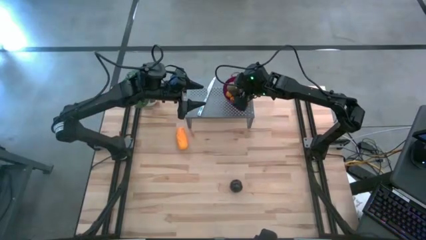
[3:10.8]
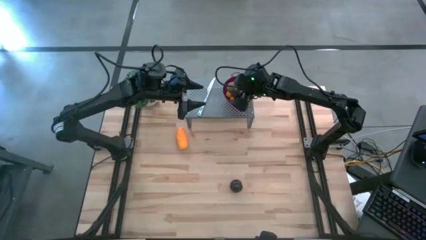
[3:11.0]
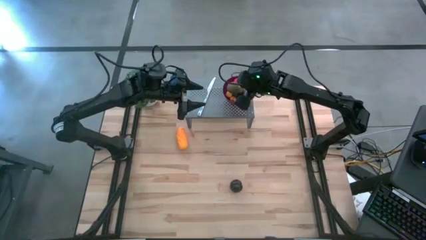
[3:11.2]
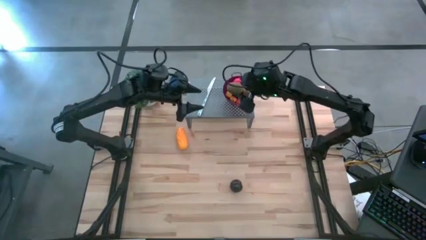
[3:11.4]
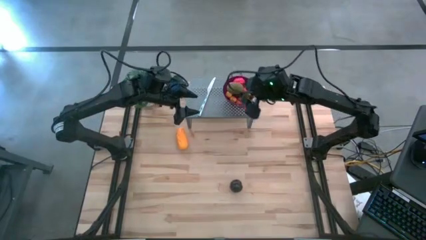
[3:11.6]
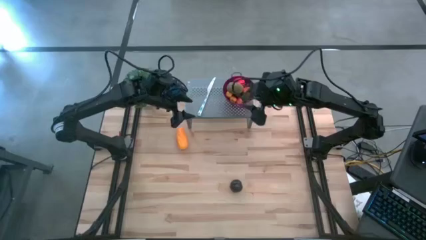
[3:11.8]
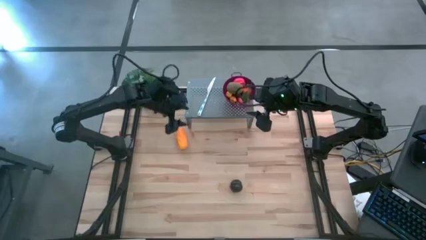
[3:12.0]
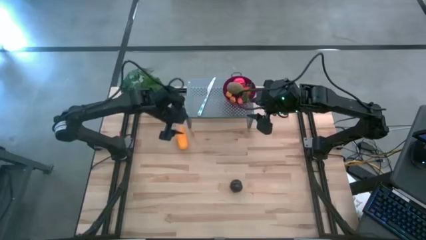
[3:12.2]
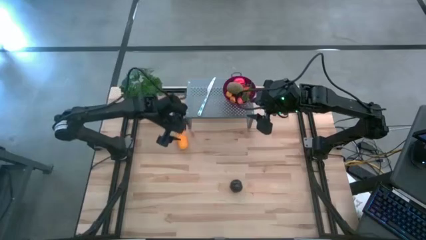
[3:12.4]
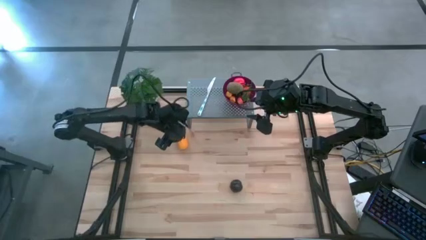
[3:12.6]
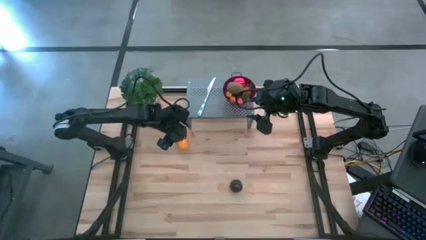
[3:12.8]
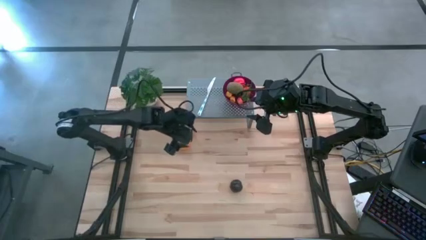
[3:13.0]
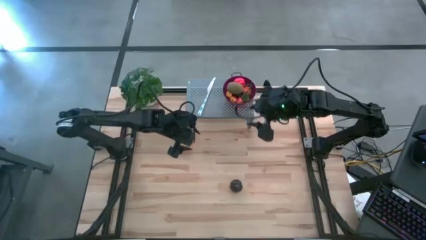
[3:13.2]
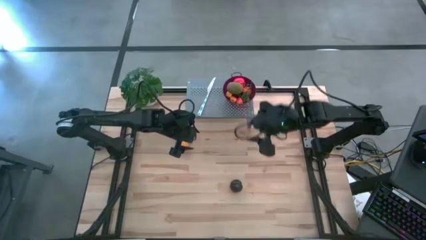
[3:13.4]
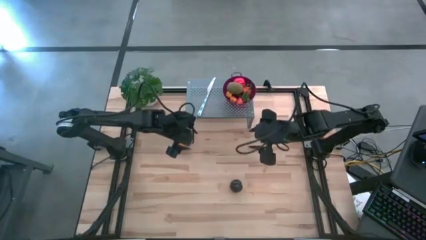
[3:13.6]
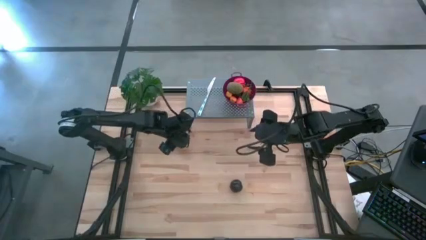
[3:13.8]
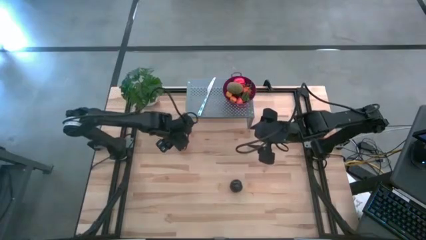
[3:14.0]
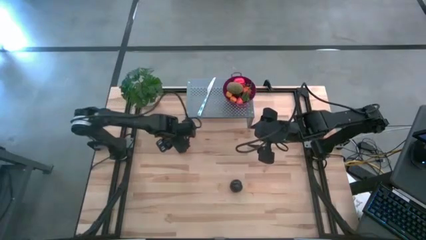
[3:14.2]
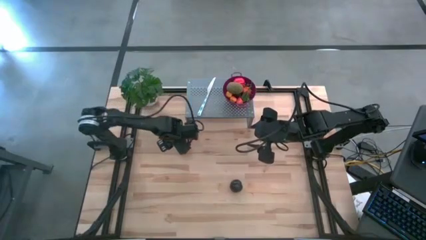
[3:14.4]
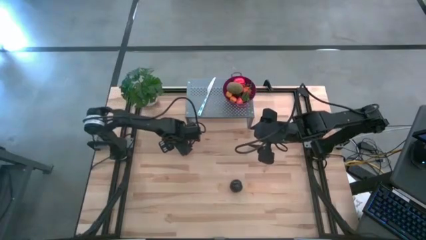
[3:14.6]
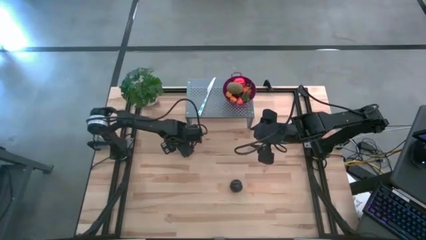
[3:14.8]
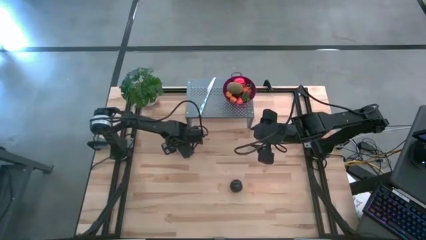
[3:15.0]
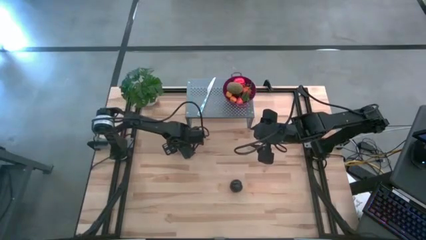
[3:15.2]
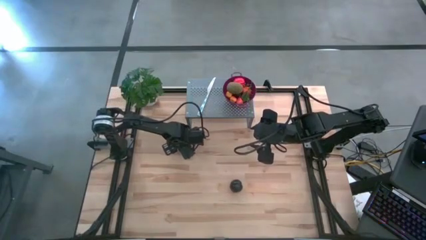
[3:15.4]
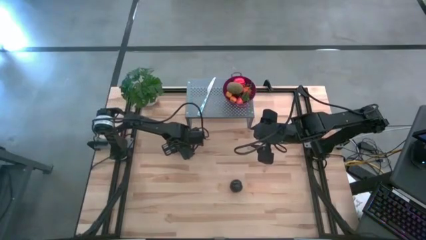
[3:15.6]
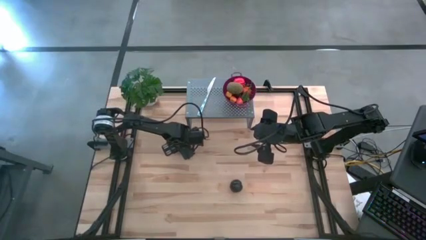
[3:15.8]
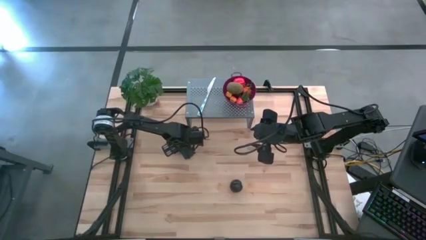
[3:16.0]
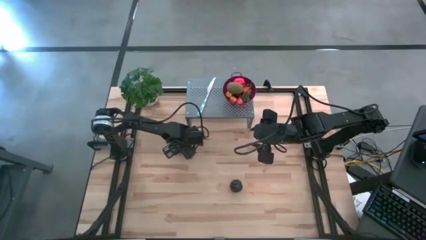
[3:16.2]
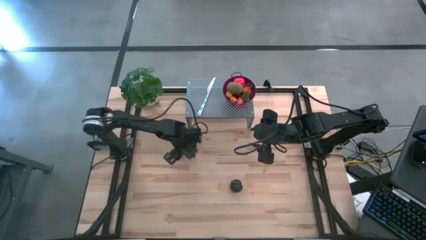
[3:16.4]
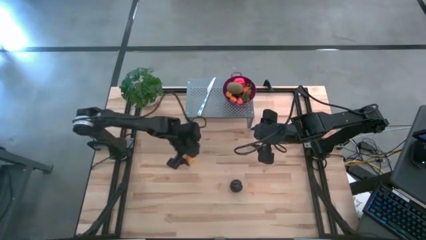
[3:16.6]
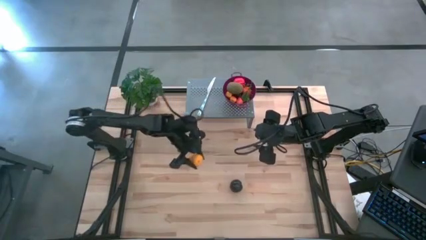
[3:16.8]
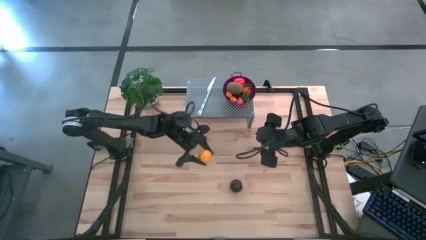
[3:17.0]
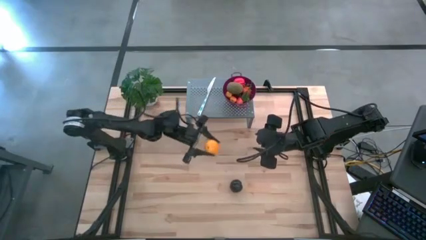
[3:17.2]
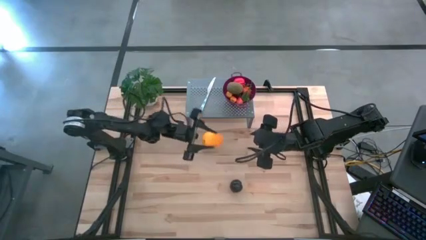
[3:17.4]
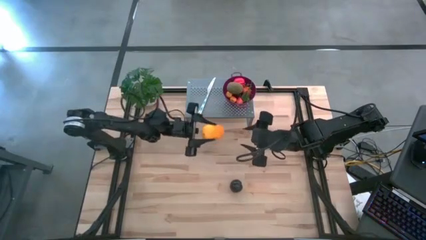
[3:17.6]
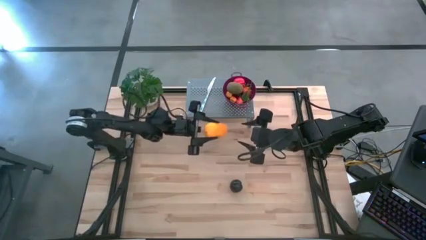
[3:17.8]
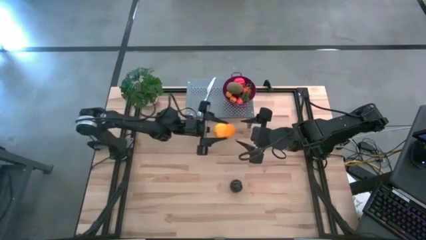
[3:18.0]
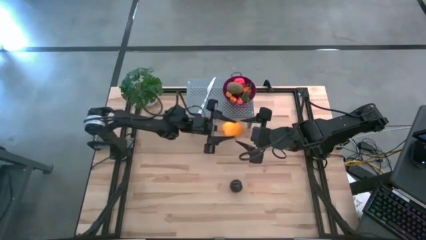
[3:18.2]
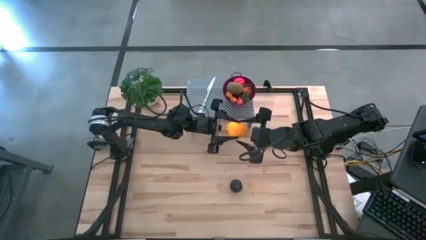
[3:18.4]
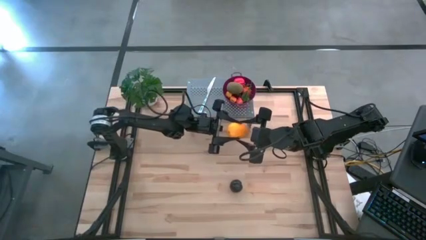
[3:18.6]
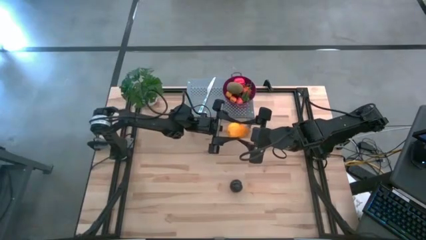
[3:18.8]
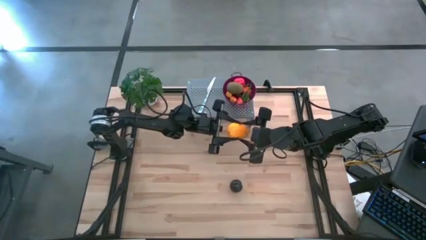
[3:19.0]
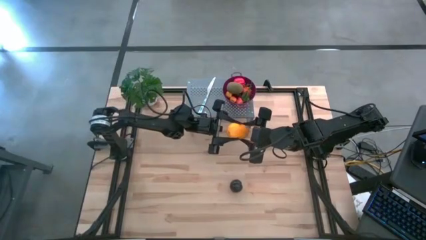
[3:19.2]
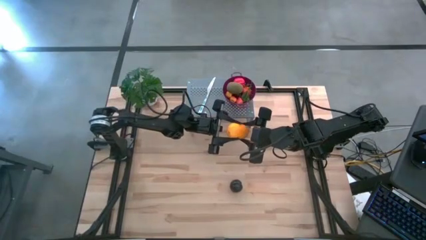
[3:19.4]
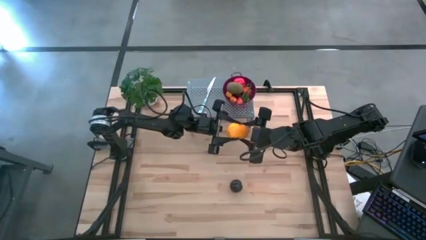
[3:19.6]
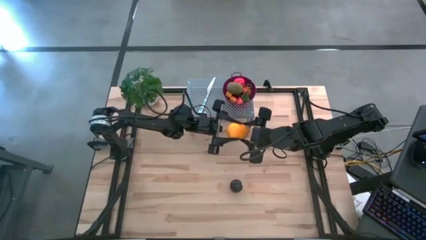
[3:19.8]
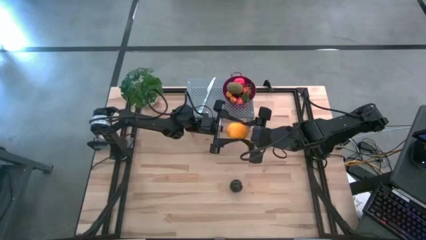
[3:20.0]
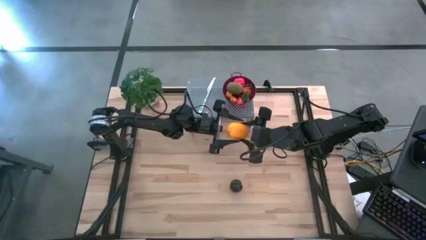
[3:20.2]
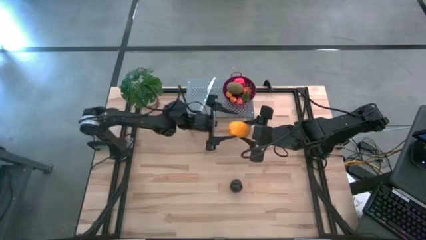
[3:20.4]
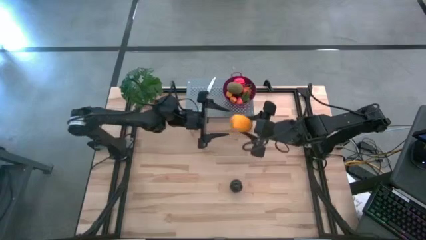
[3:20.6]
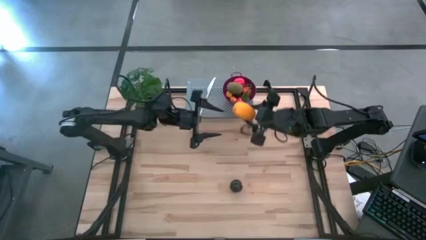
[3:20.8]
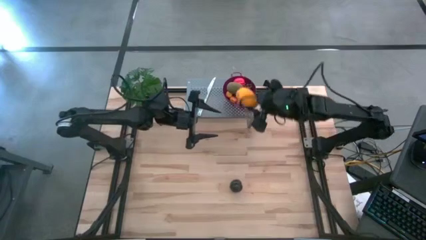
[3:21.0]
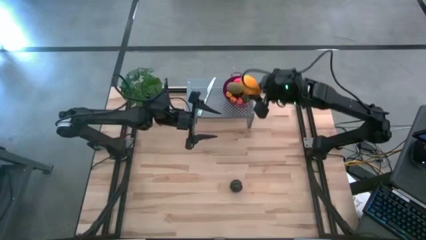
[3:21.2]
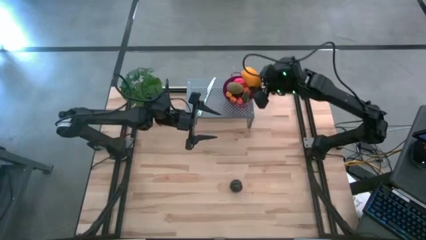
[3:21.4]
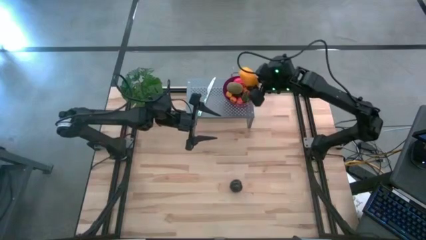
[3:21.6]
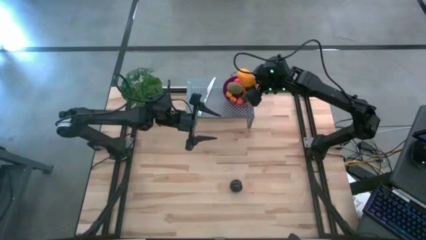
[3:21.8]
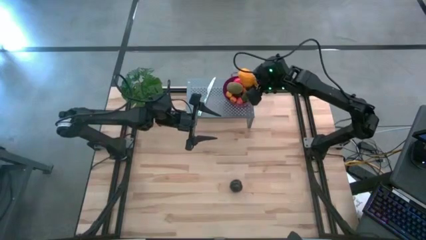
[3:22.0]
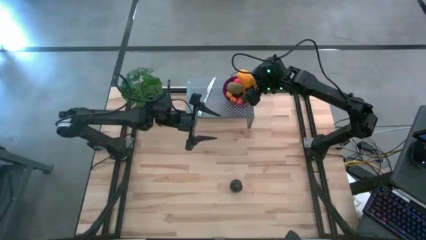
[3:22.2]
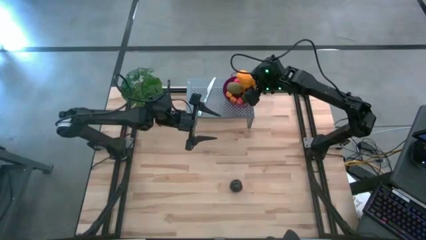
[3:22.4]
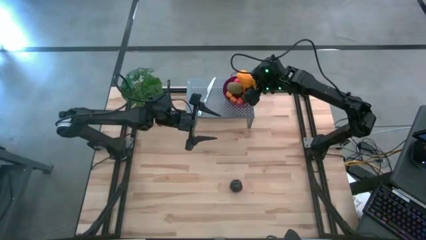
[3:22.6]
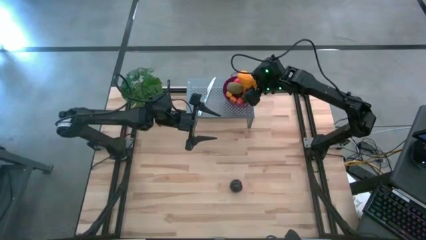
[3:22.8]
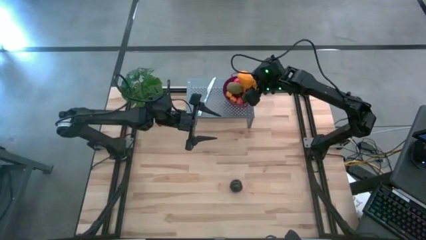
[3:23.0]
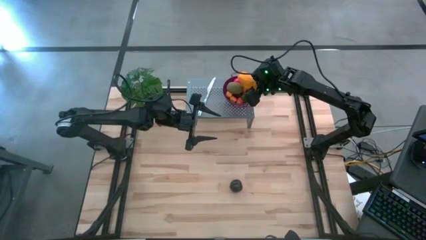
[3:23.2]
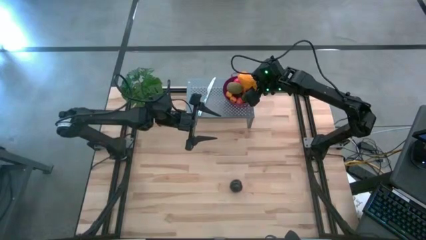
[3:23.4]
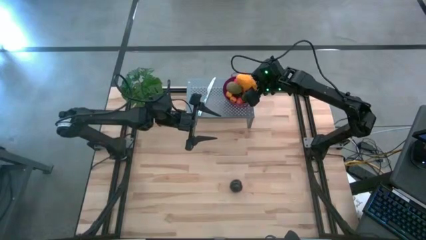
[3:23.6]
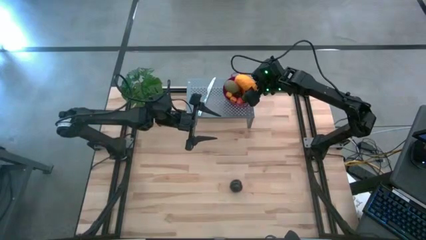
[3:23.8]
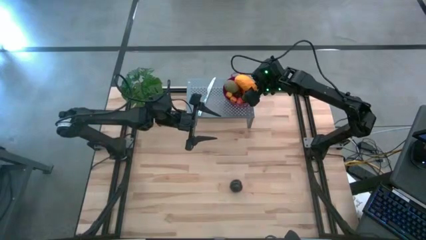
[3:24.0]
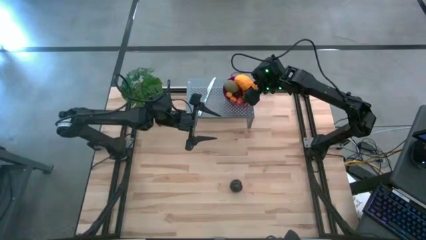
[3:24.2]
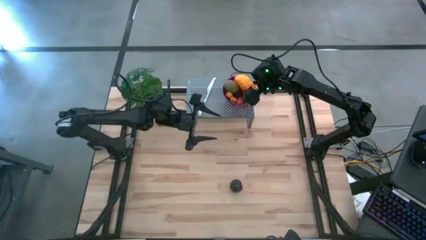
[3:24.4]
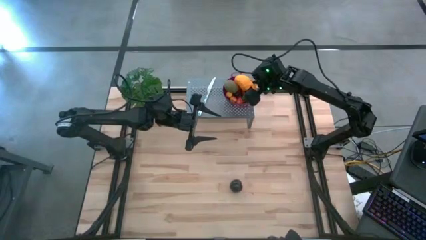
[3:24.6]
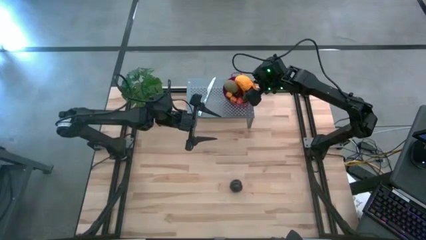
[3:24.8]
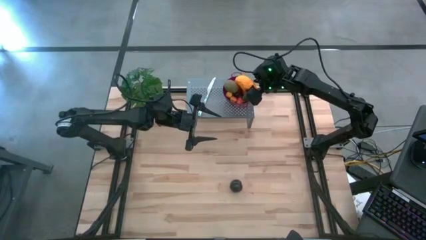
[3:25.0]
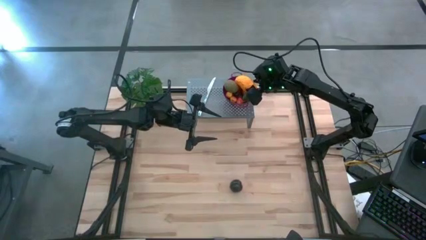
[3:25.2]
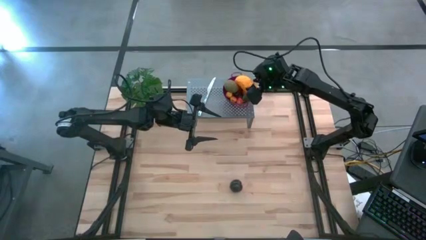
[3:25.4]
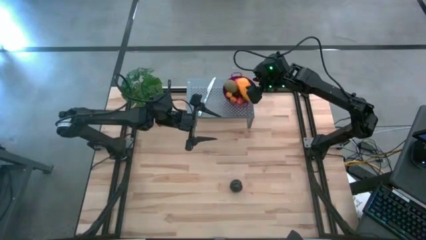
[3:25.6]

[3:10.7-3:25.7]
Task: Pick & Place Fruit
Put the yellow mango into the violet strainer bowl on the shelf
